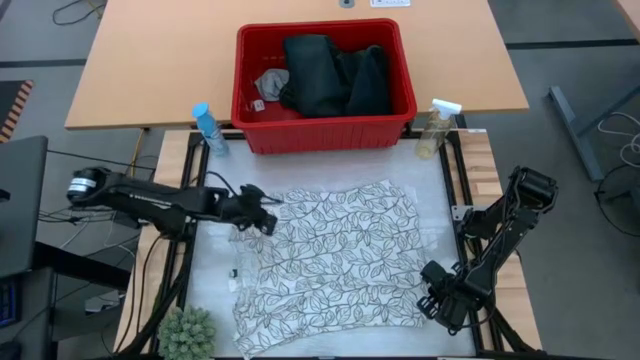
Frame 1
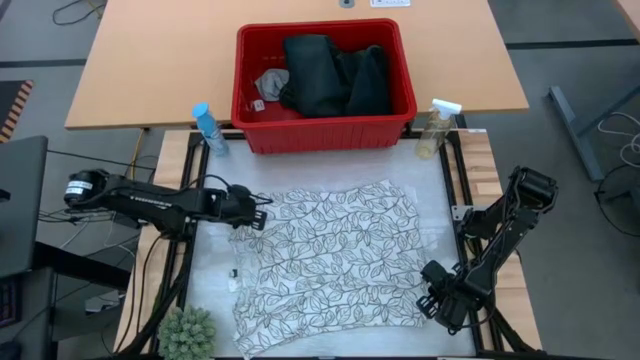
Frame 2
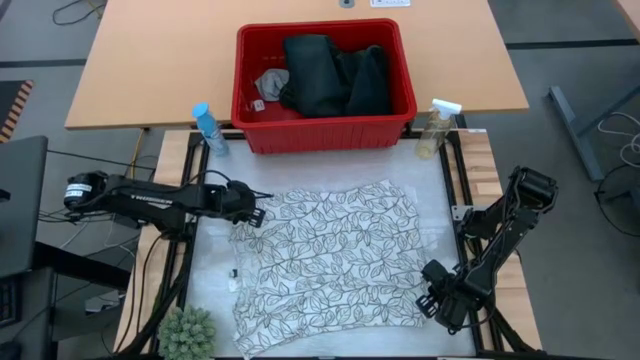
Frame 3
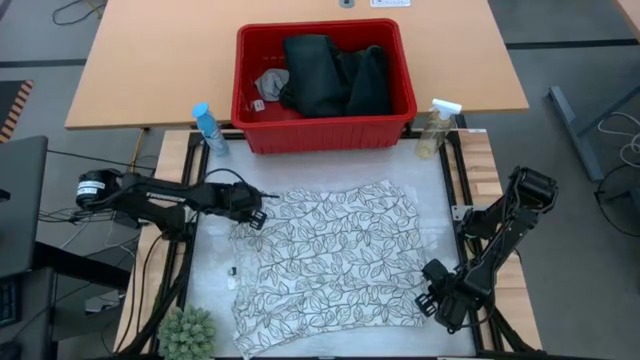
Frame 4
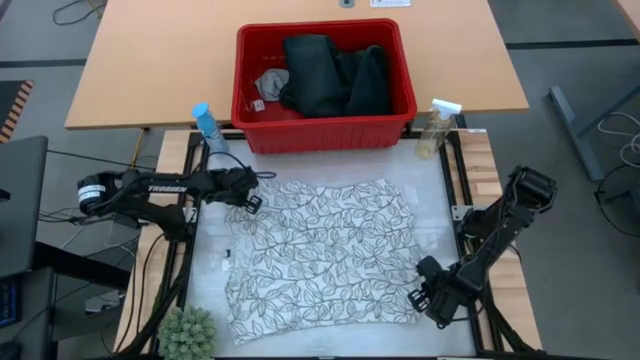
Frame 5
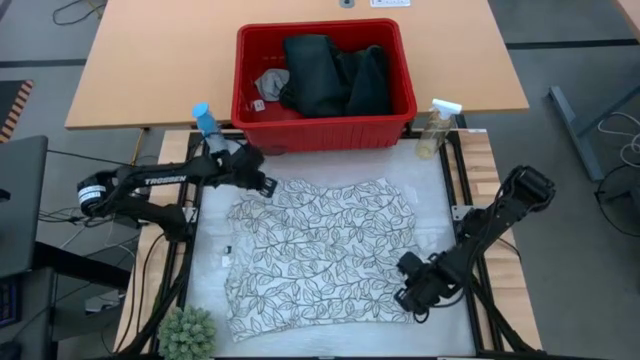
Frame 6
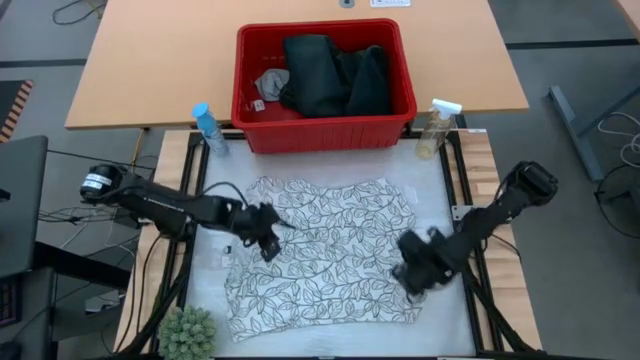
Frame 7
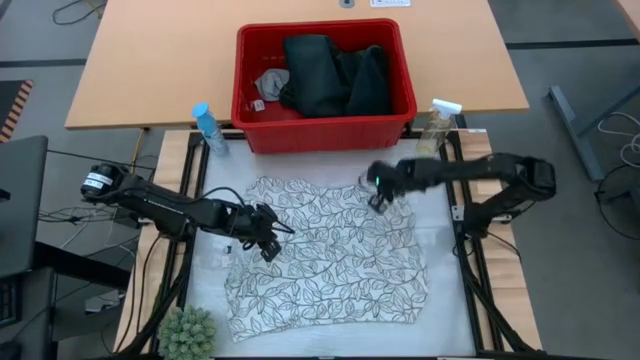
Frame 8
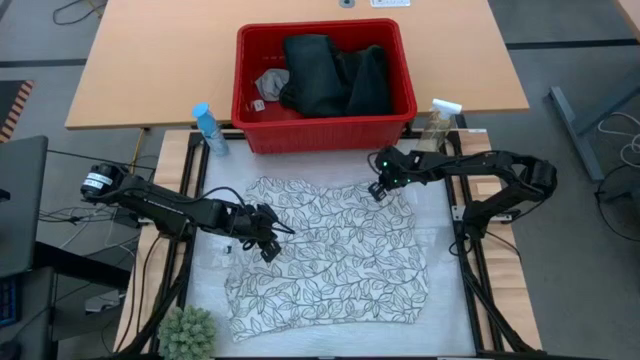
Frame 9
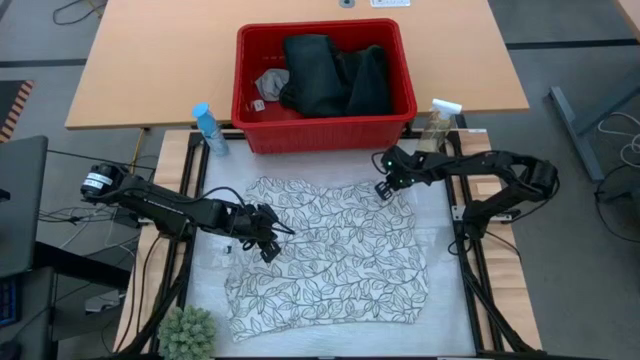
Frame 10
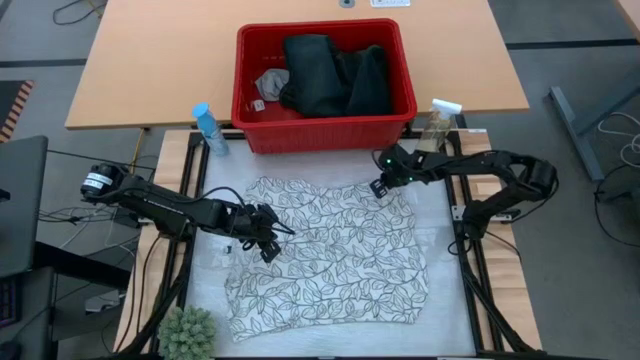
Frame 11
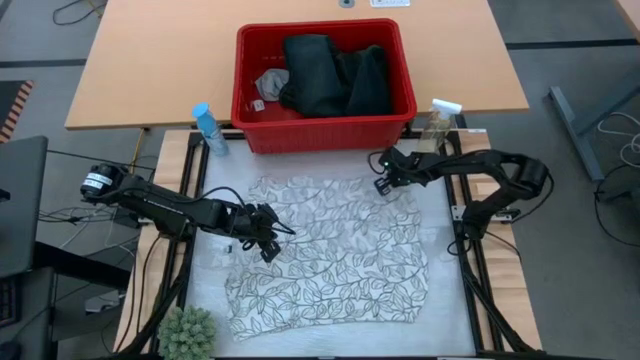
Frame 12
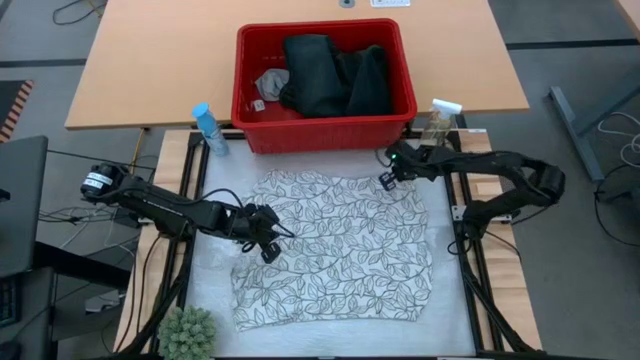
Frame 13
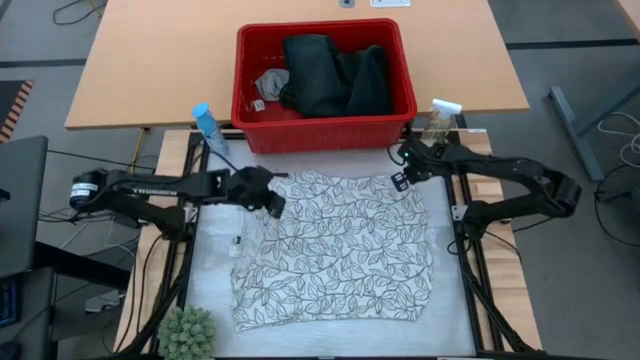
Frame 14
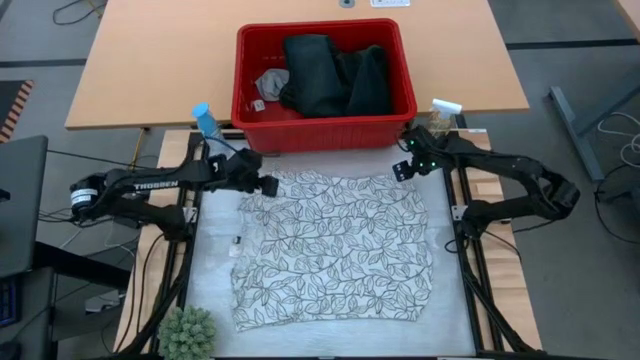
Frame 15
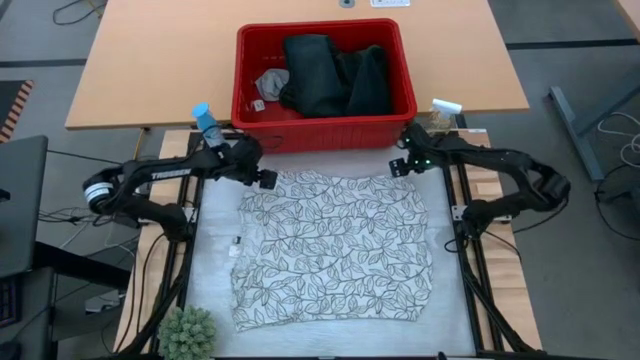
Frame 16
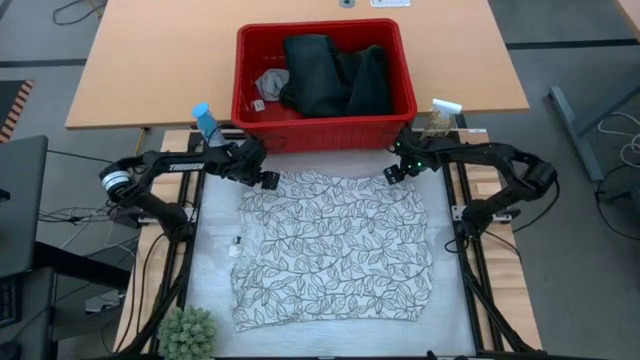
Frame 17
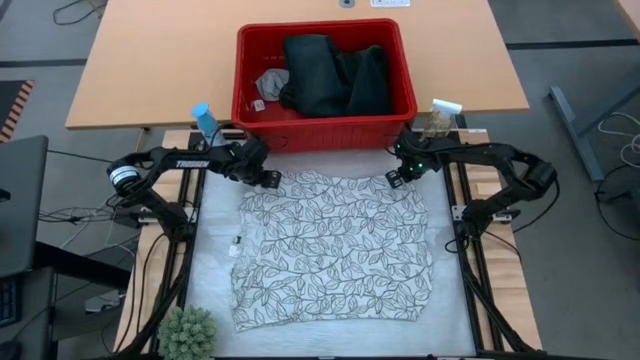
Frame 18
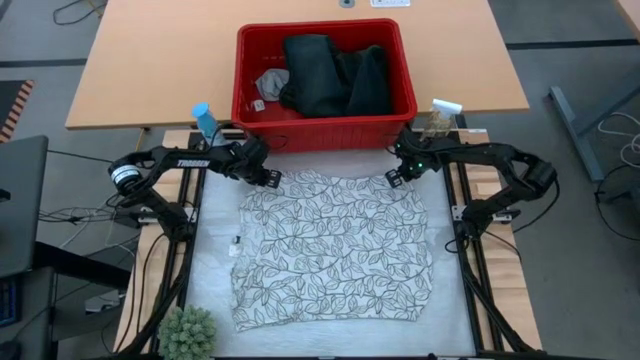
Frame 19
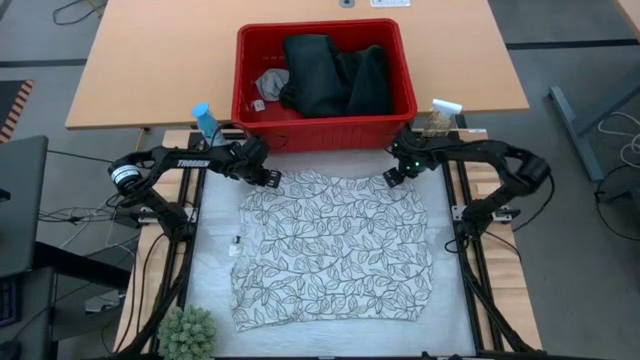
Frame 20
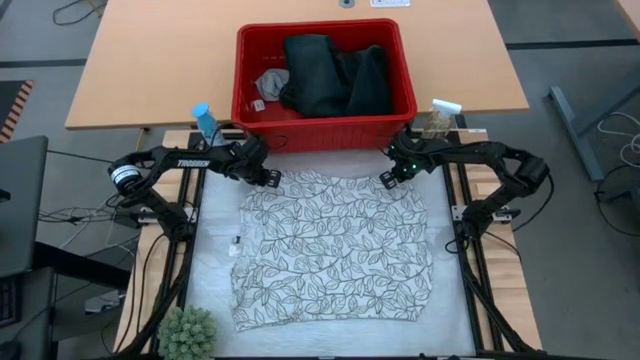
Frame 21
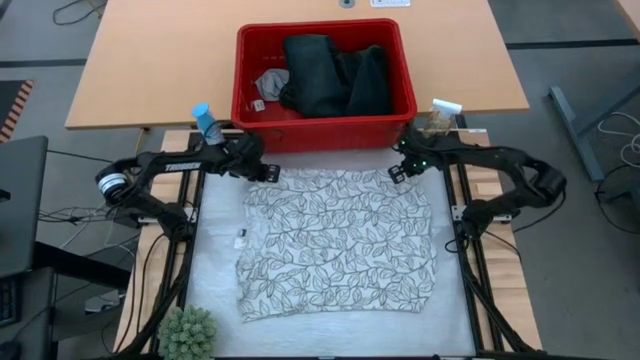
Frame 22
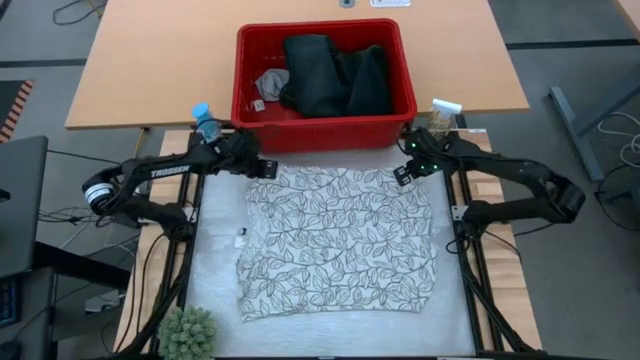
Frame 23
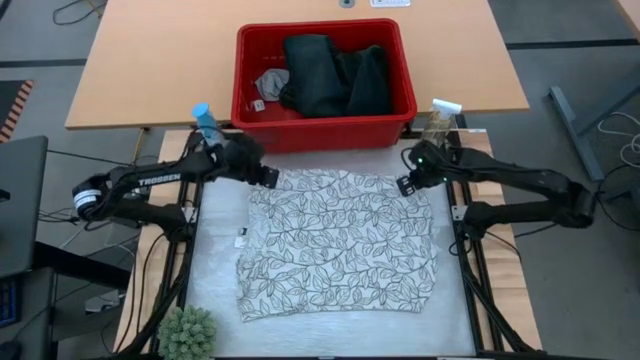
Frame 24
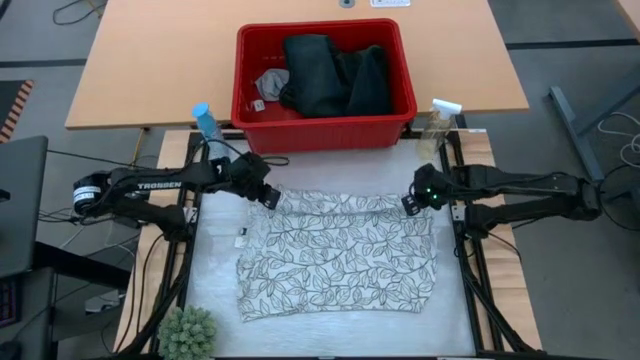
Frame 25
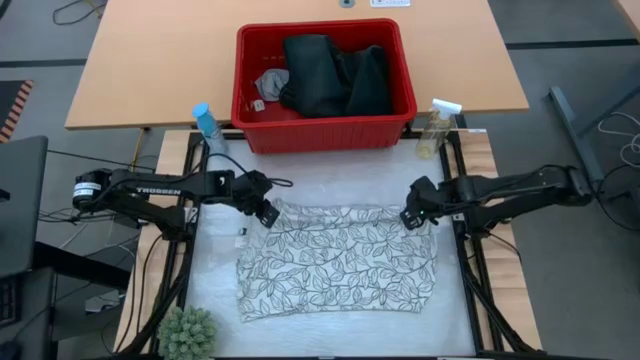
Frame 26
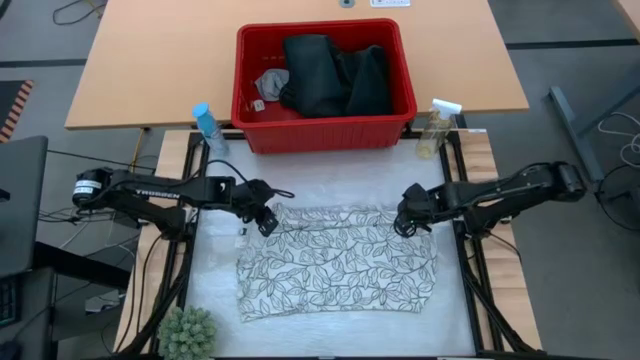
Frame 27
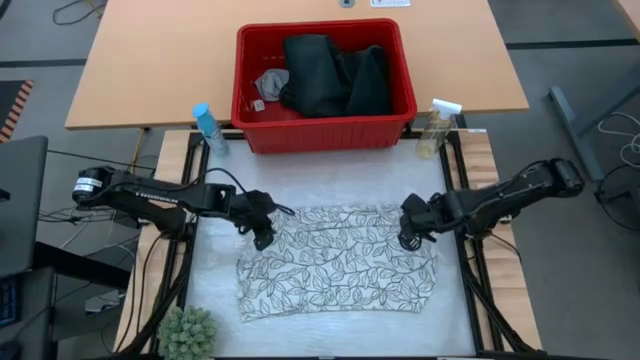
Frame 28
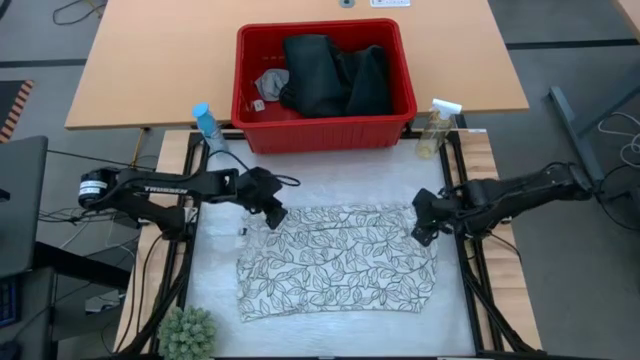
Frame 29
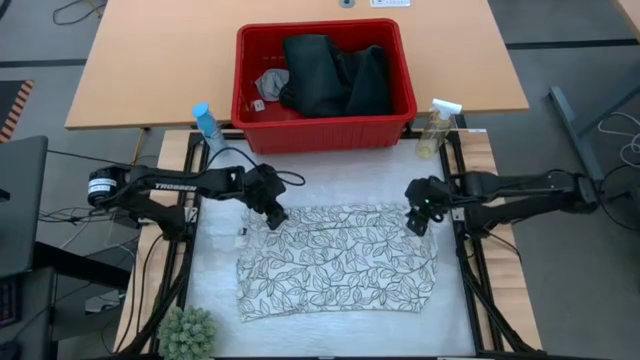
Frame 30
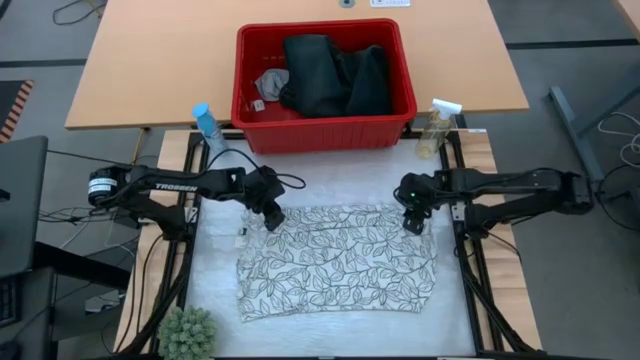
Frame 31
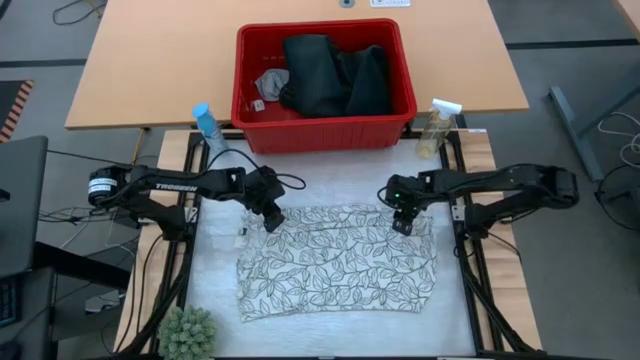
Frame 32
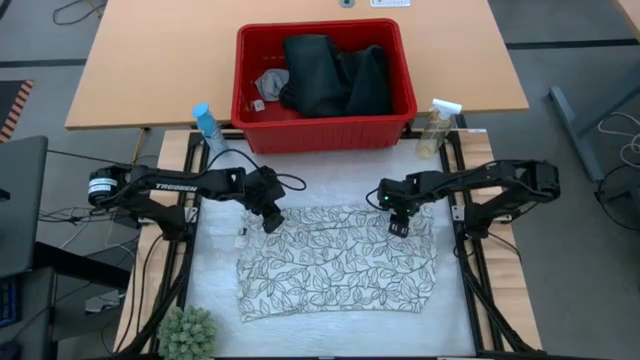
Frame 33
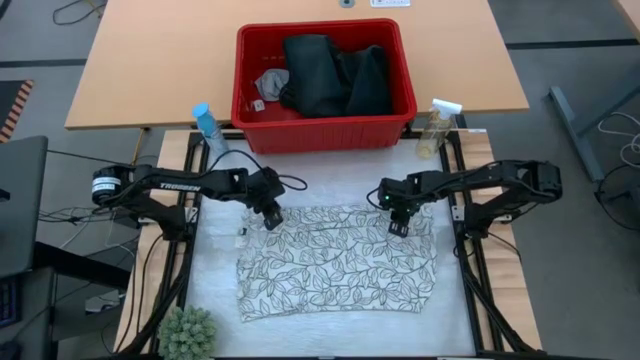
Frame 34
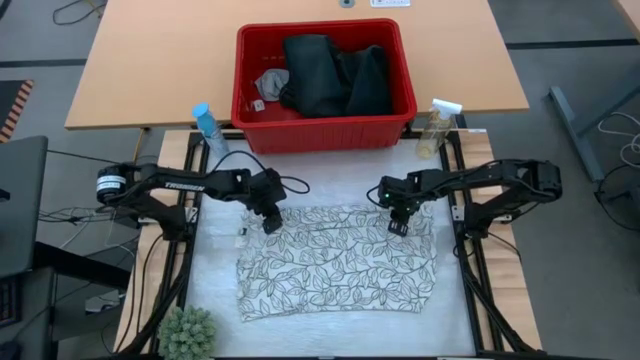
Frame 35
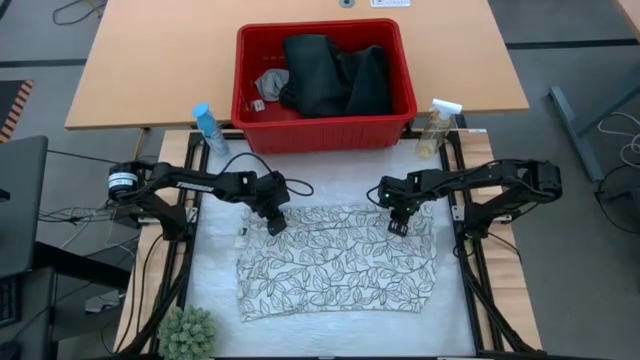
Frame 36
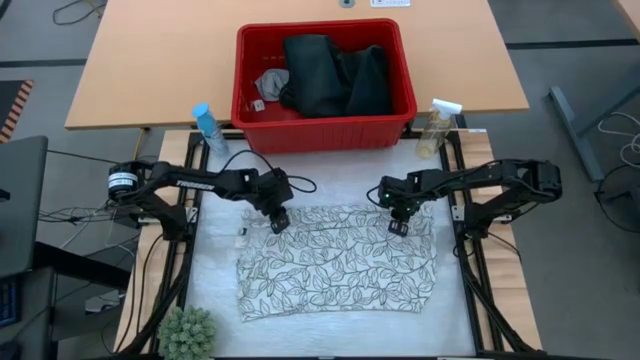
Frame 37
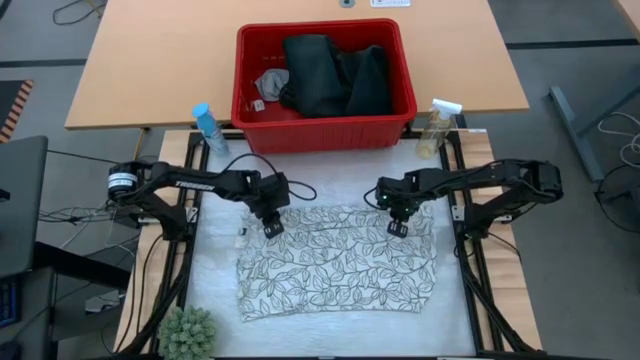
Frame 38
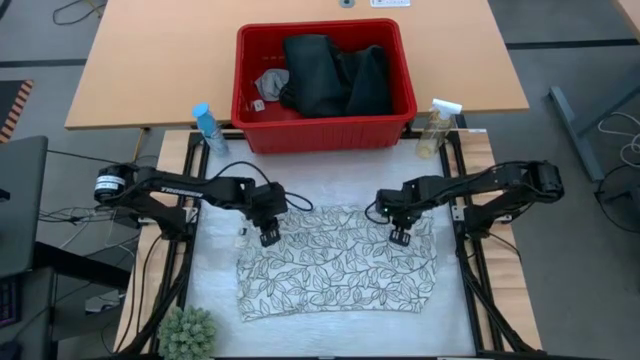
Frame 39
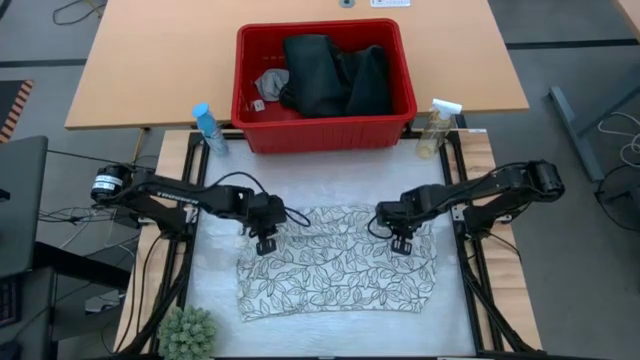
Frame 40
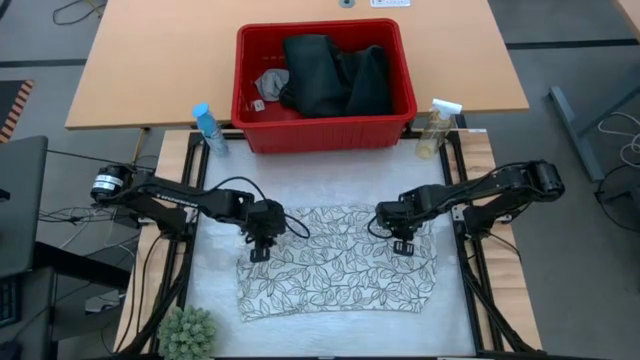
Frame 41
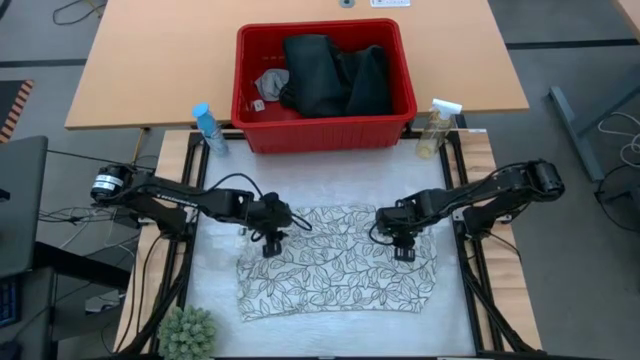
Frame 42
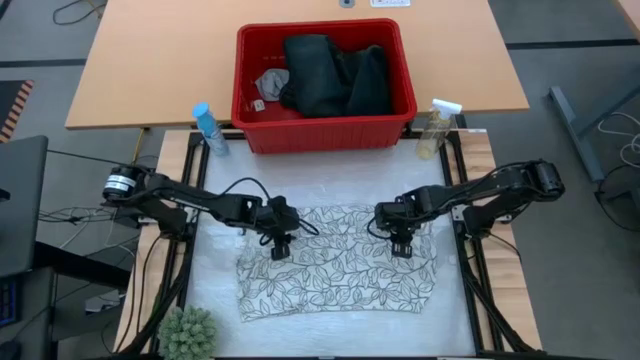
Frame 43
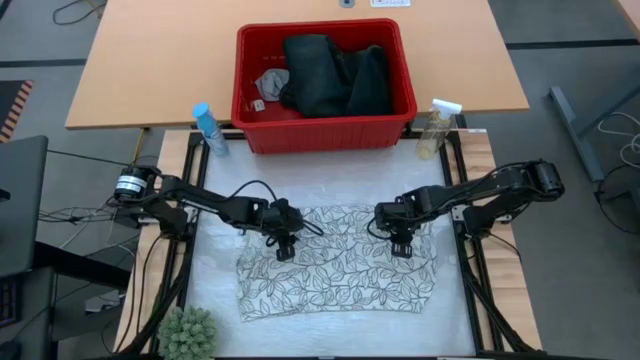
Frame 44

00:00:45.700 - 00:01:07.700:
Task: Fold laundry
Fold the white-patterned shirt
